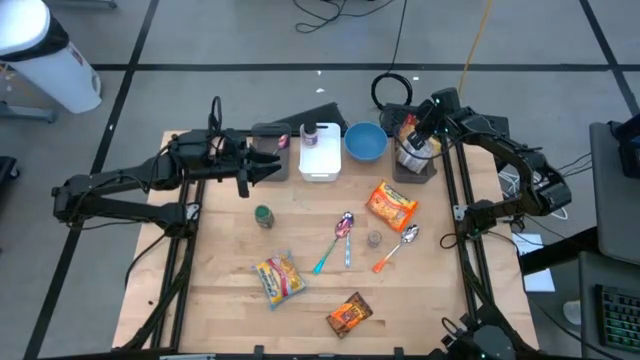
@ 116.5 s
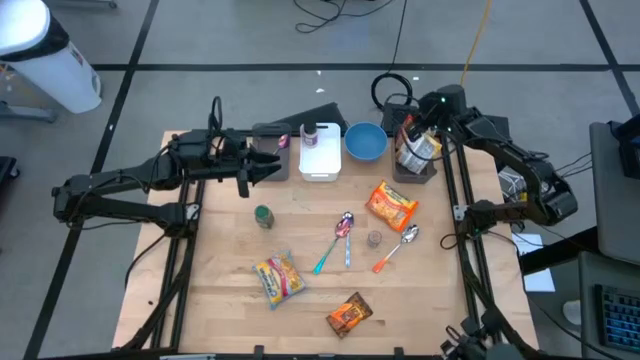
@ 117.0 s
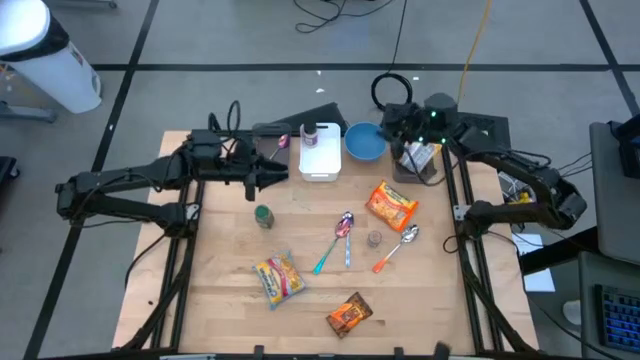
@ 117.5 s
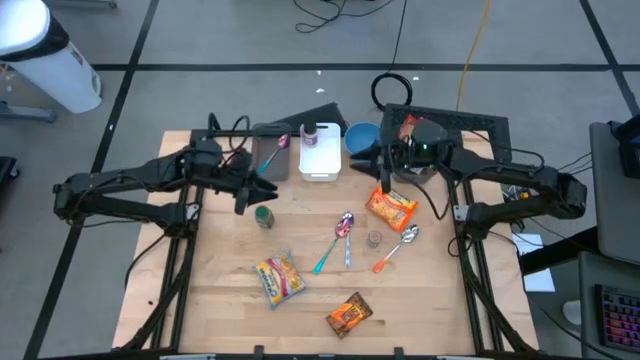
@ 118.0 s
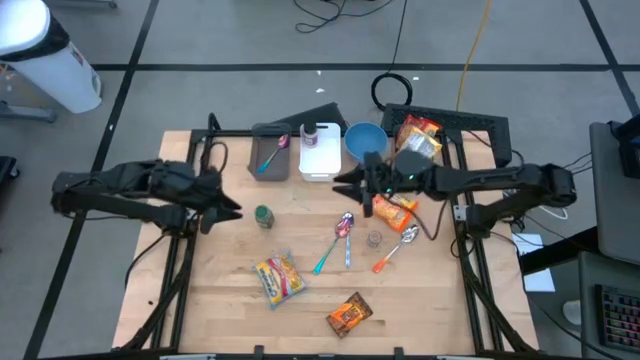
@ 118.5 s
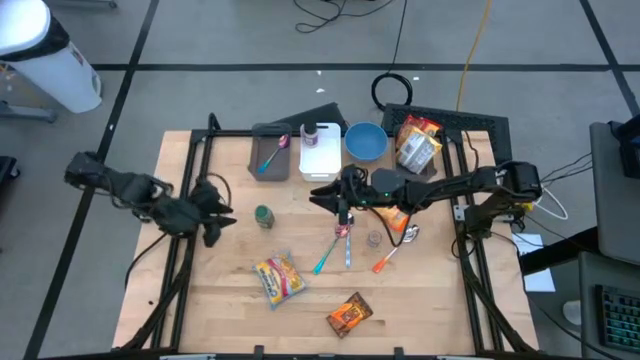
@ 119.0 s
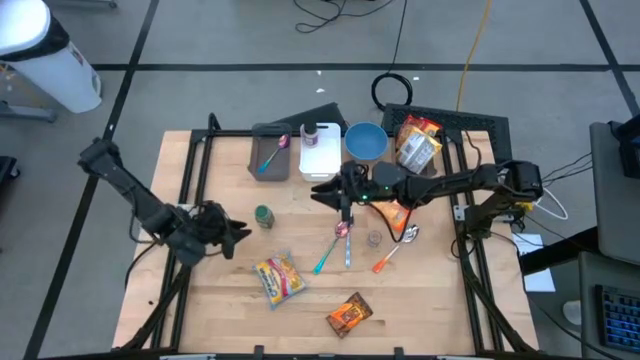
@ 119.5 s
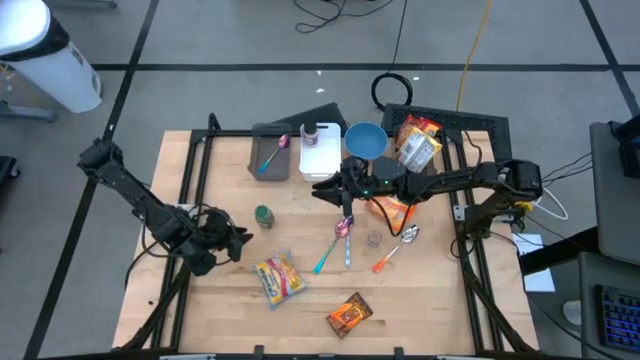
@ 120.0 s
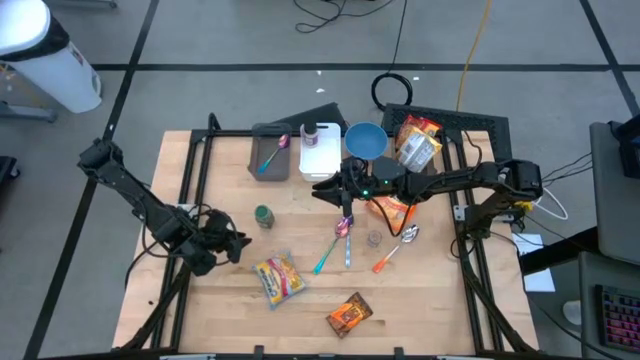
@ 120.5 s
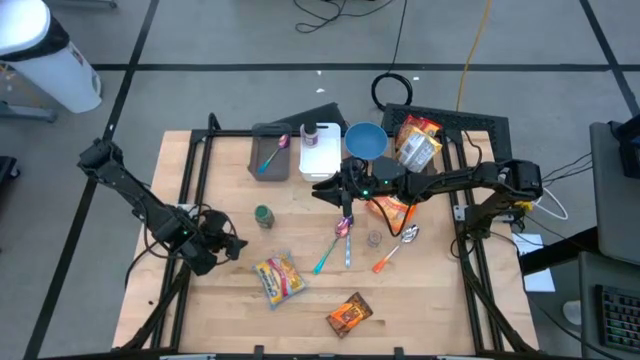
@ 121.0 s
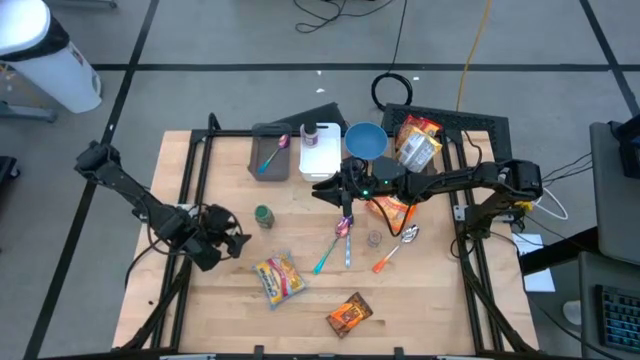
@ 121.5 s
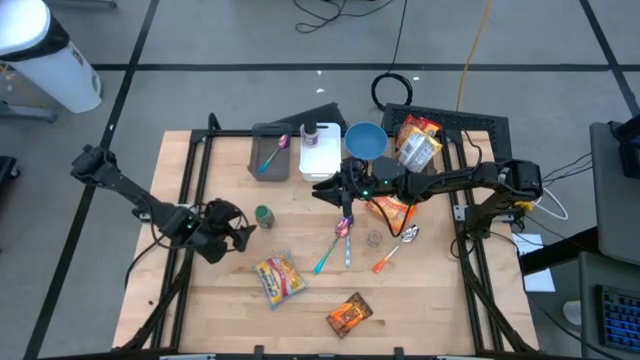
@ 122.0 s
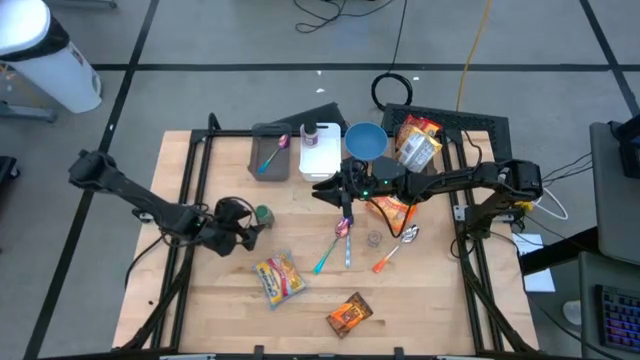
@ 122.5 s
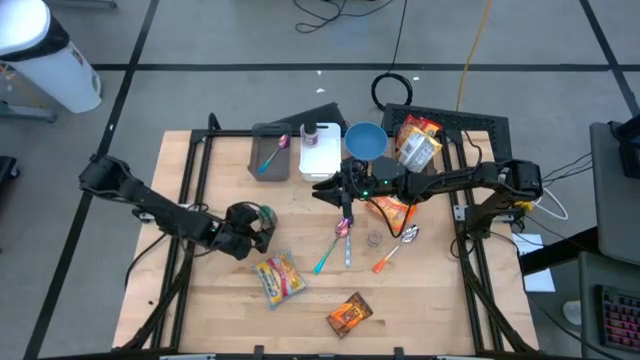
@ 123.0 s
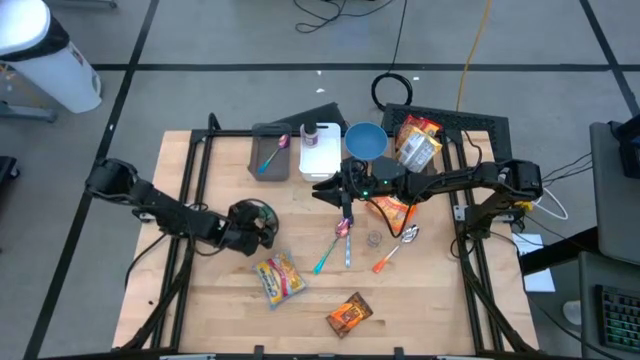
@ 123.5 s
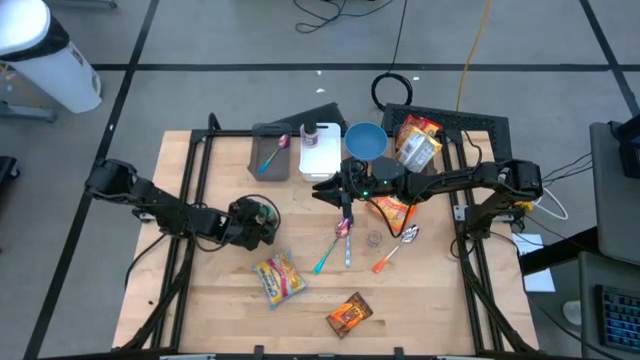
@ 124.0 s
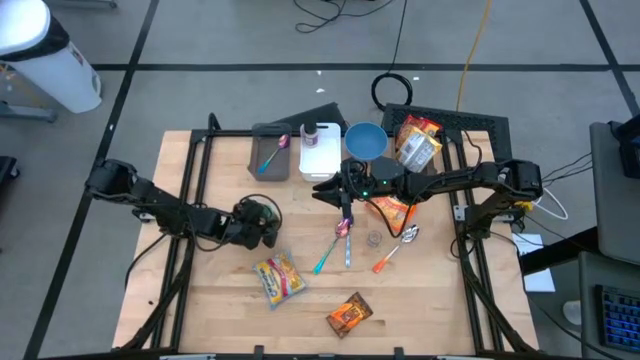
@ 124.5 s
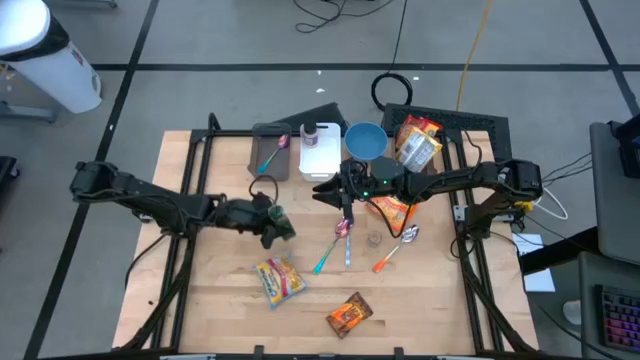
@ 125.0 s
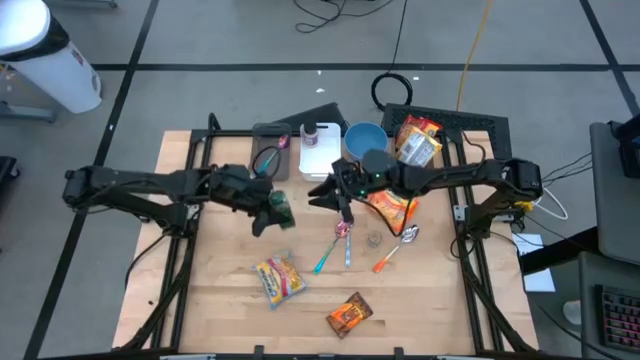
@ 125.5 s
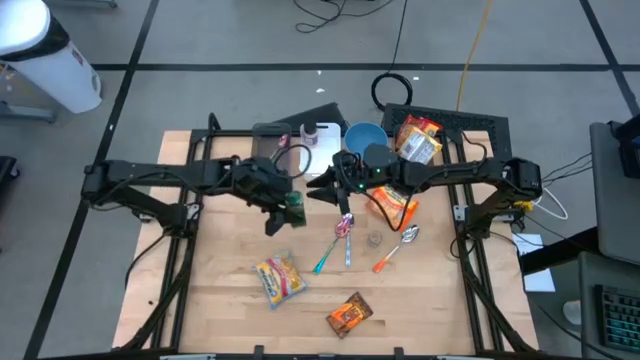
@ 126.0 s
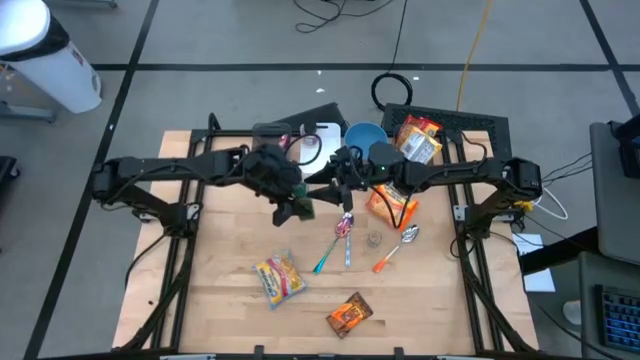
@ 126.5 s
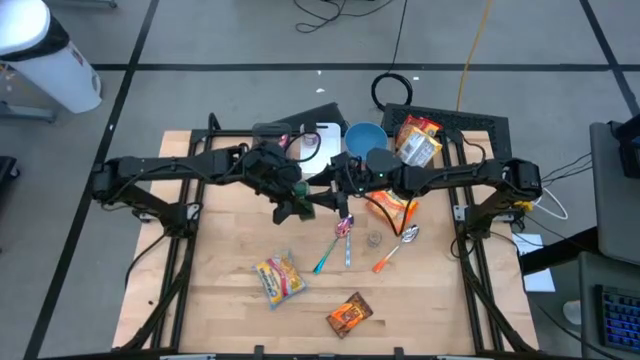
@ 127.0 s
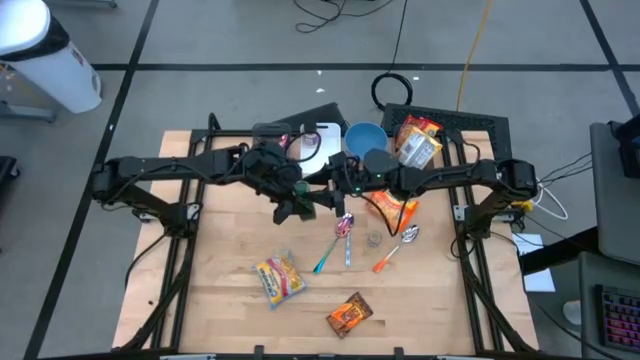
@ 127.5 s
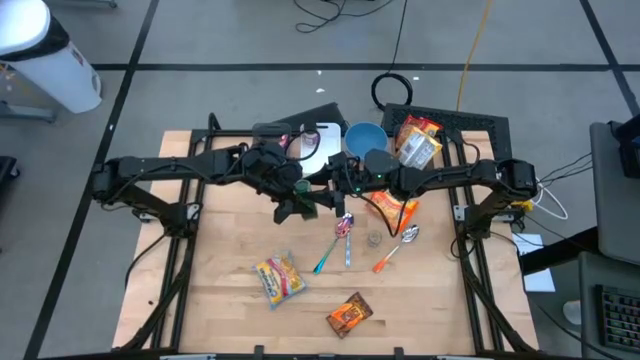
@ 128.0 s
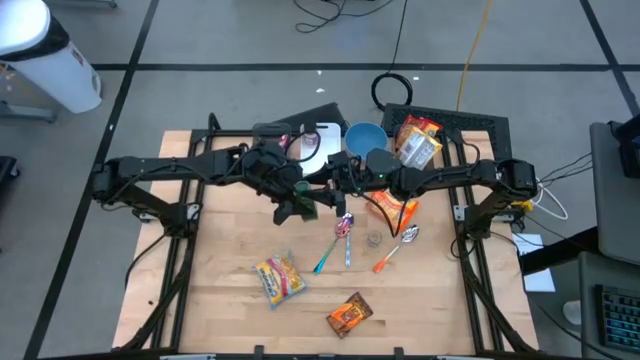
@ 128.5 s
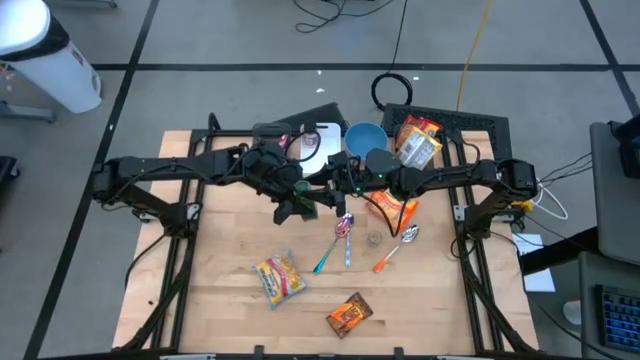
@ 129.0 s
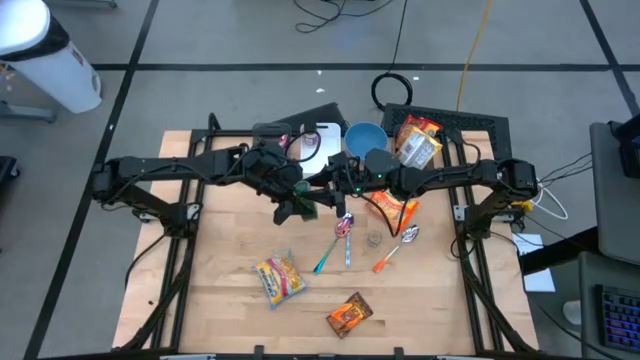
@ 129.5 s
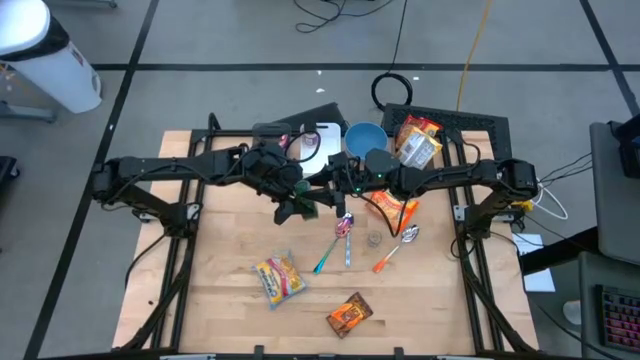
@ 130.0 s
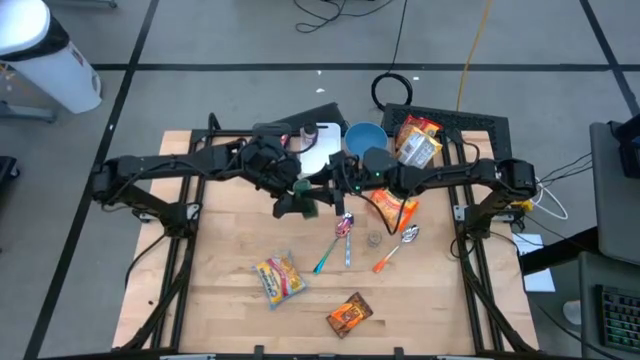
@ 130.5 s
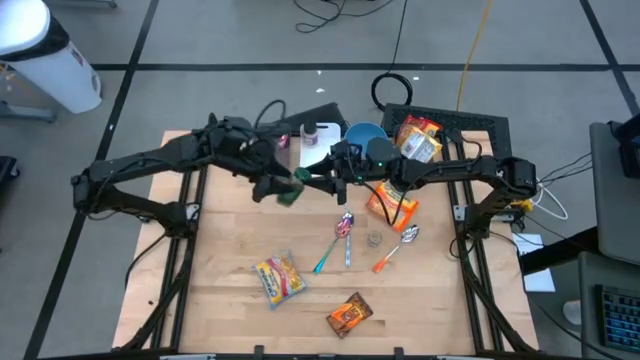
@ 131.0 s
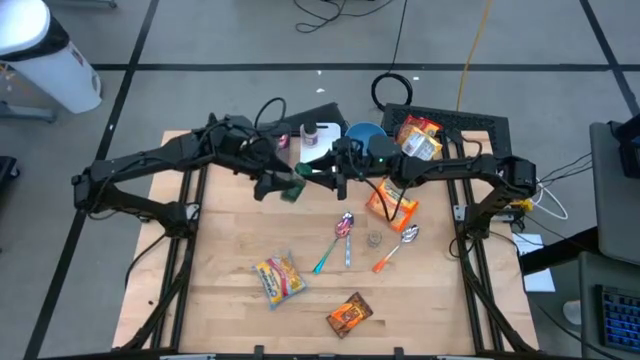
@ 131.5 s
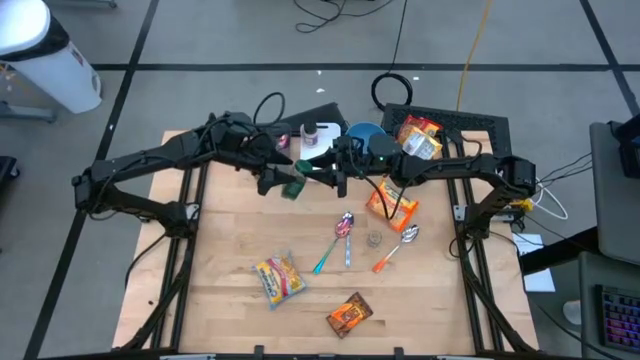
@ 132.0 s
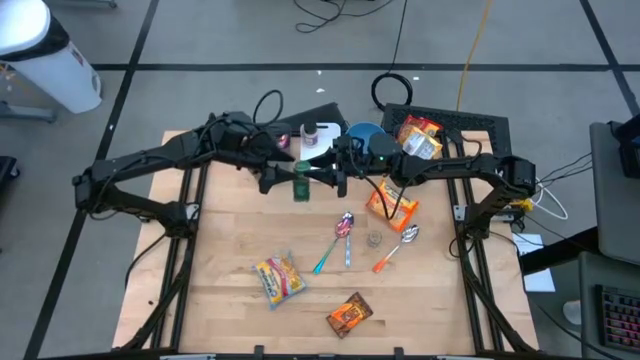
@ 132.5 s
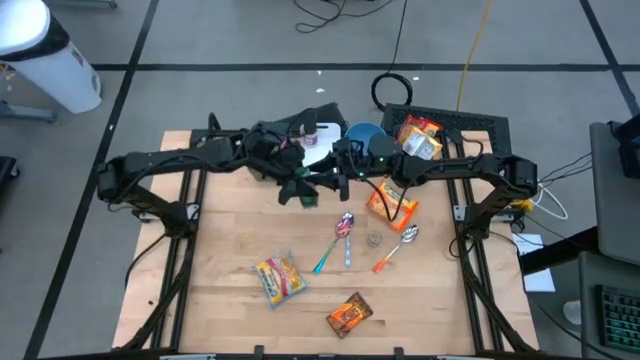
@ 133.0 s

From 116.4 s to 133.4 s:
Task: Pick & Place Food Item
Put the green seasoning bottle into the white bin

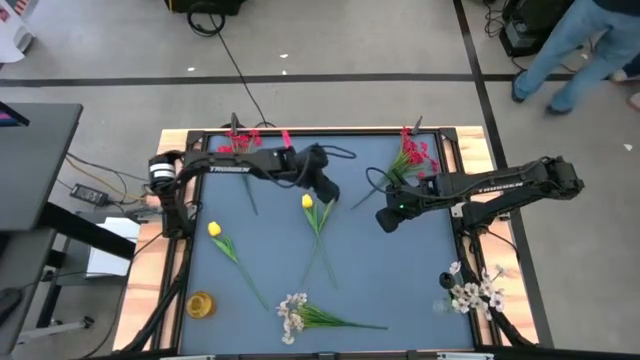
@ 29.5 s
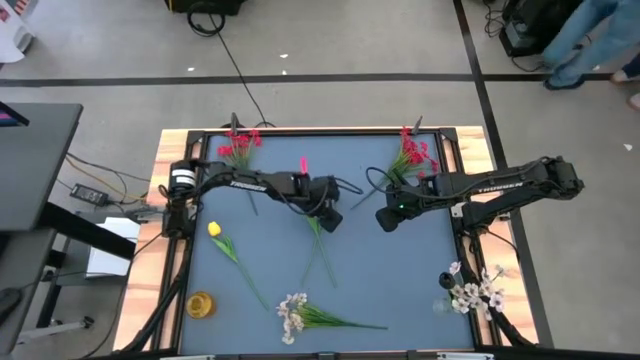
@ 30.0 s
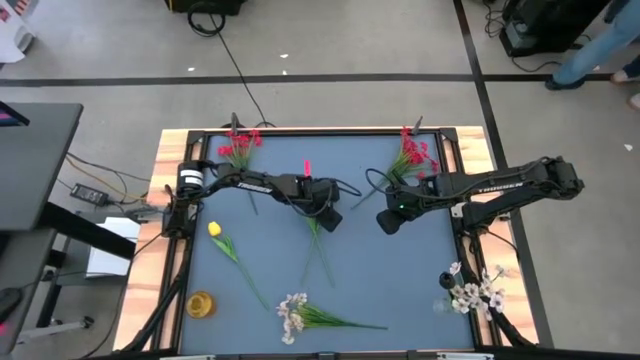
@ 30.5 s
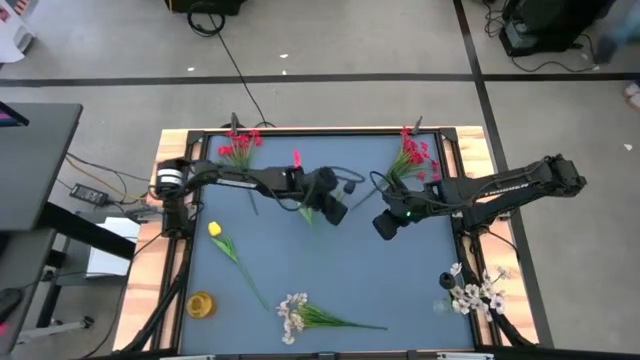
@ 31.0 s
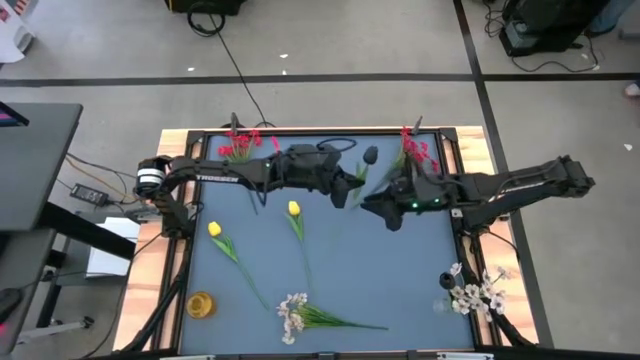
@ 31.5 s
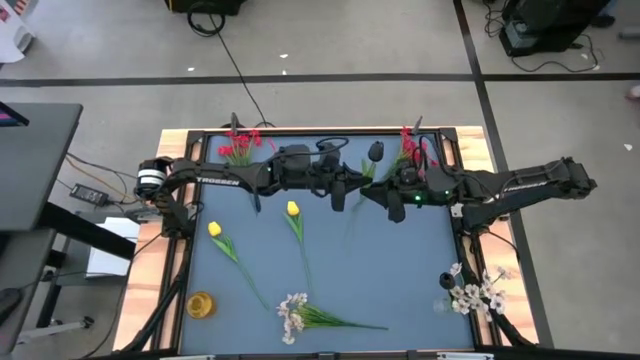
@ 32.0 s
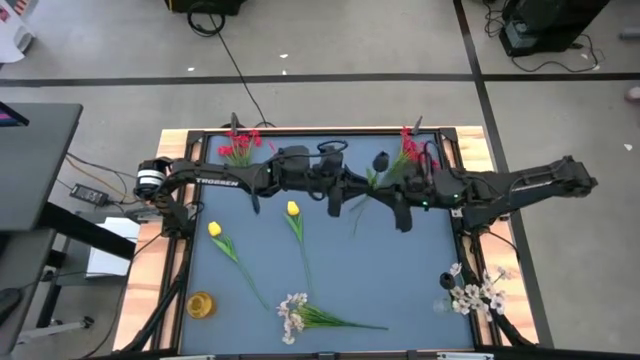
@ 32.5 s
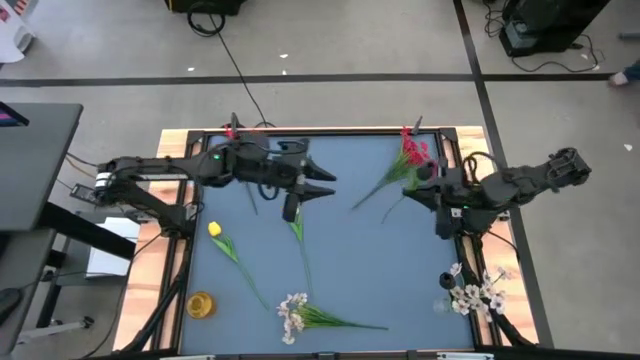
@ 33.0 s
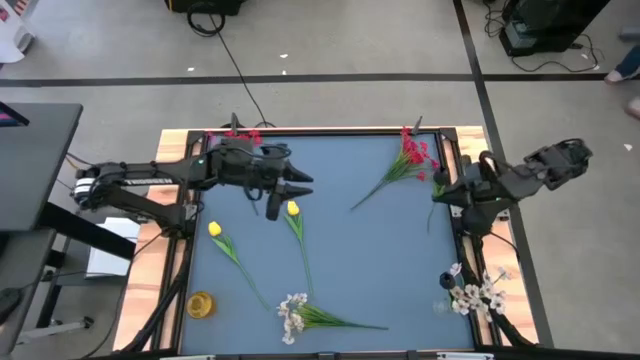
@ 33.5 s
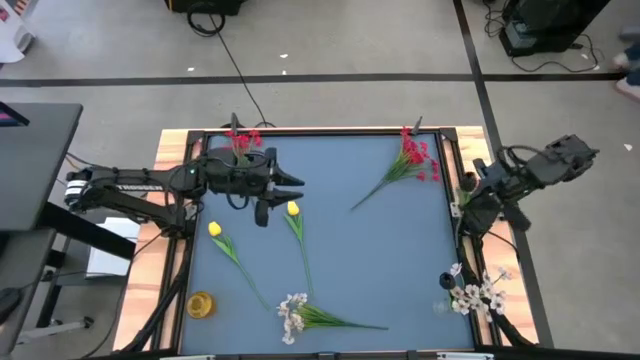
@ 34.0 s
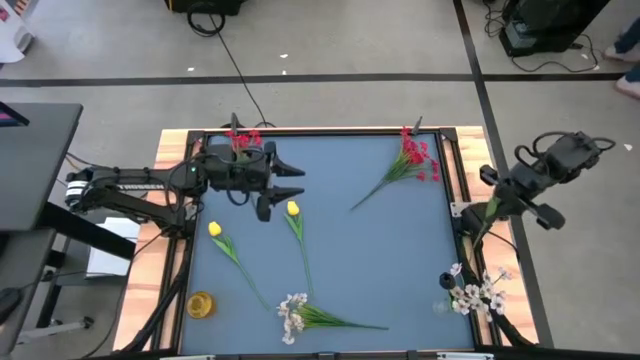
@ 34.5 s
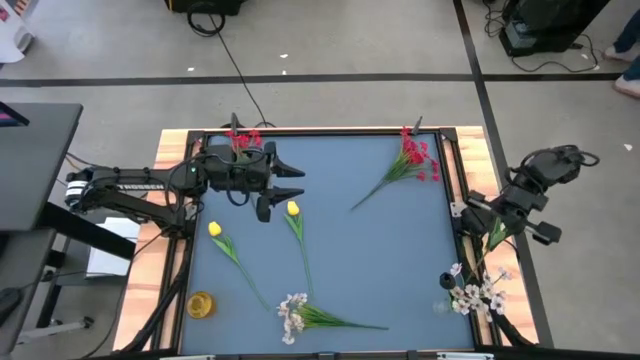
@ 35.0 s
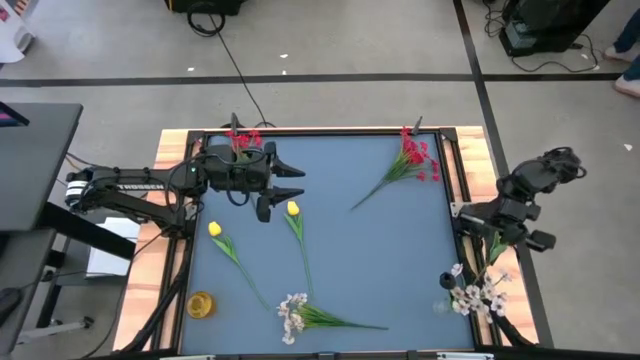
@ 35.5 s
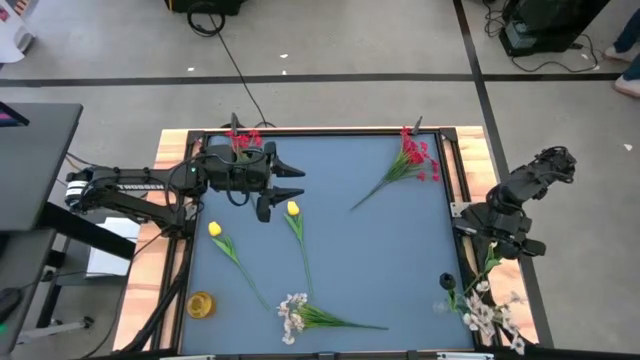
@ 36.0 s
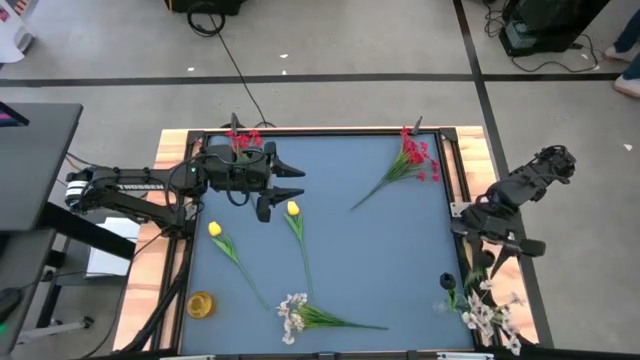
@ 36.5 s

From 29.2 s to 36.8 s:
Task: Sort flowers into vase by color
Put the black flower into the transparent vase
